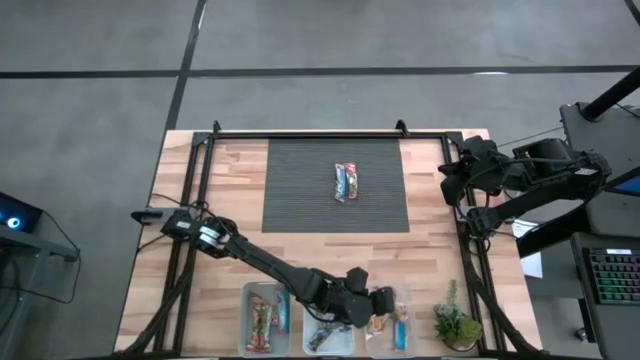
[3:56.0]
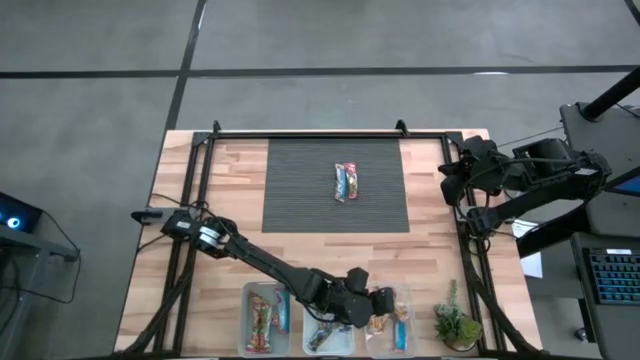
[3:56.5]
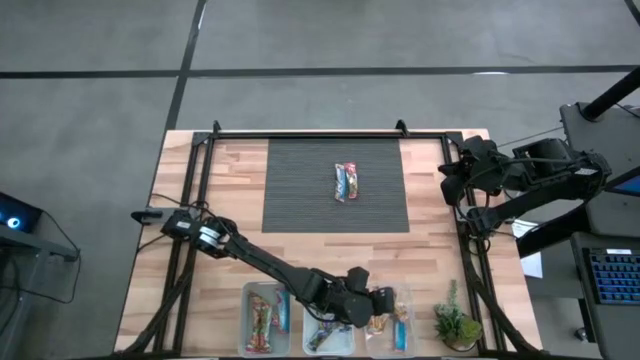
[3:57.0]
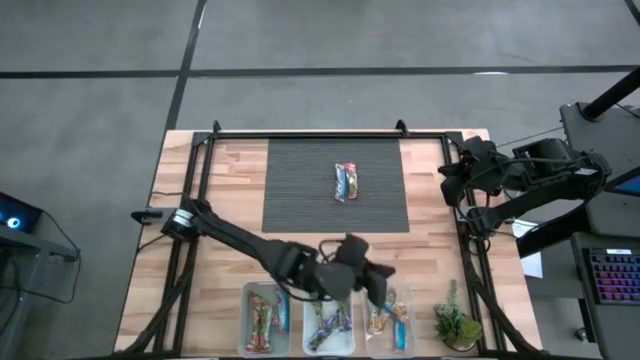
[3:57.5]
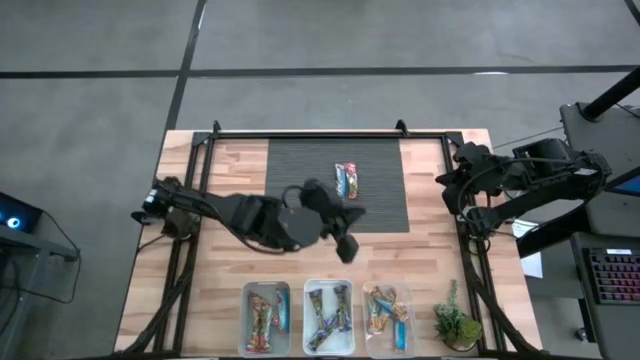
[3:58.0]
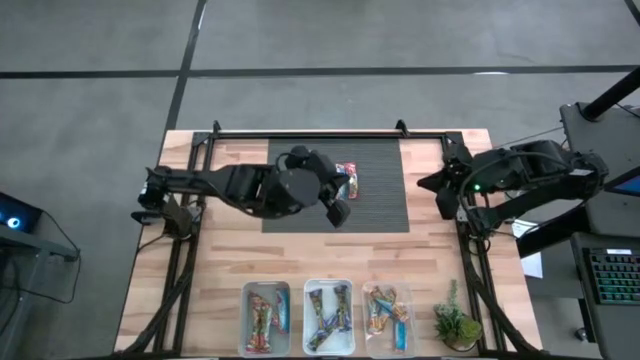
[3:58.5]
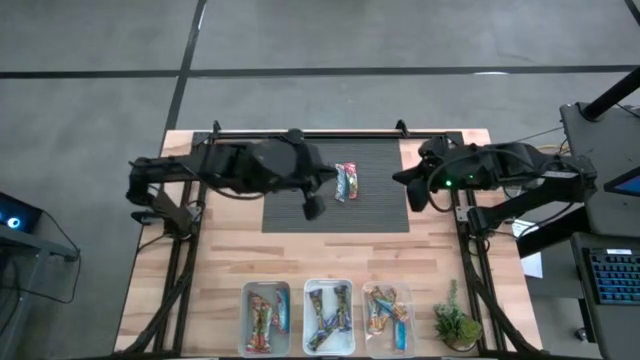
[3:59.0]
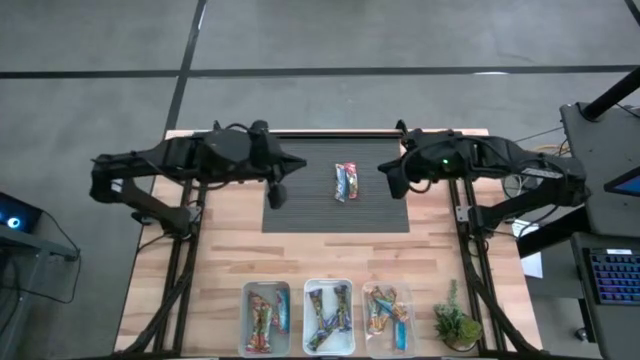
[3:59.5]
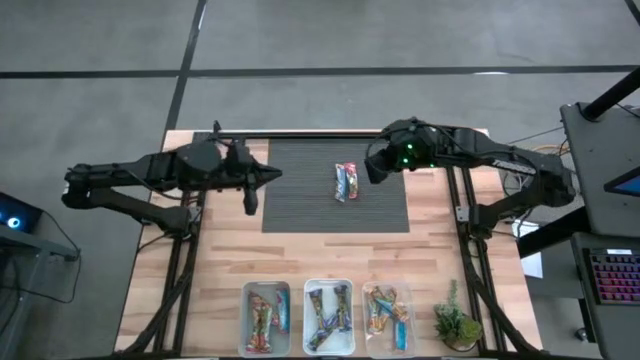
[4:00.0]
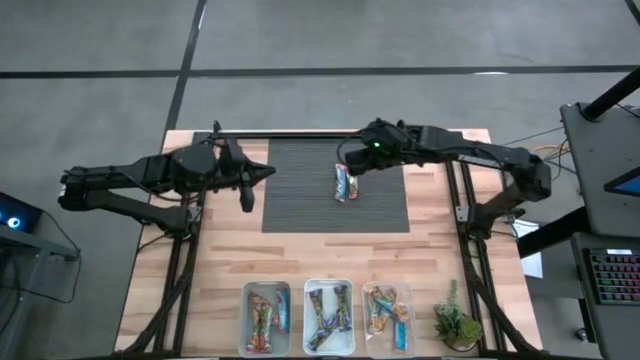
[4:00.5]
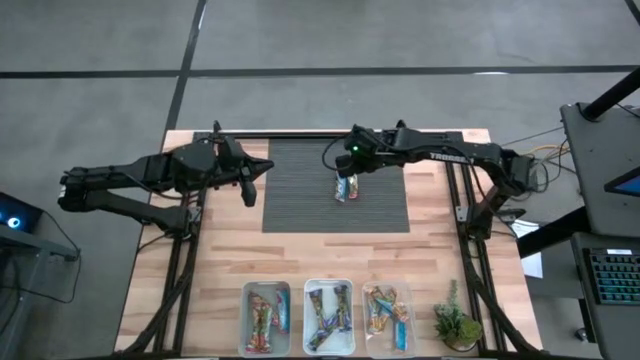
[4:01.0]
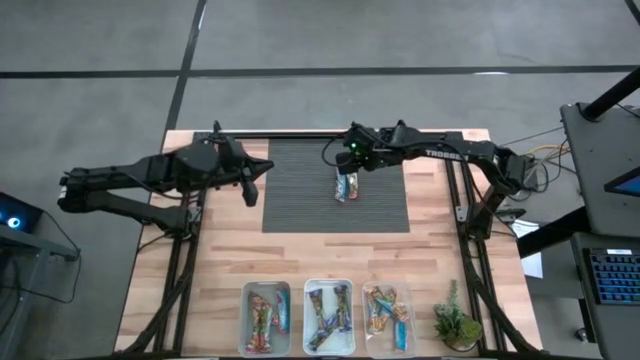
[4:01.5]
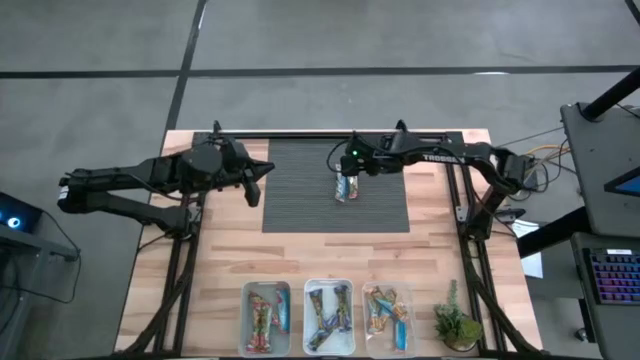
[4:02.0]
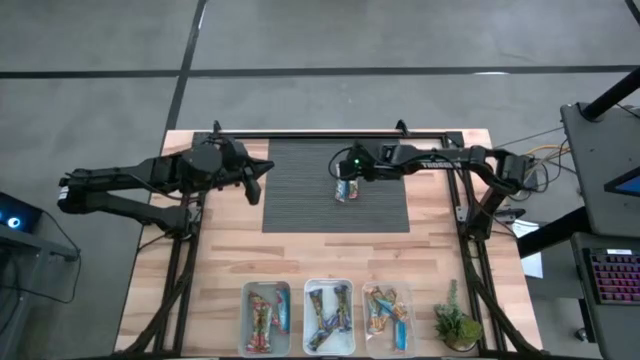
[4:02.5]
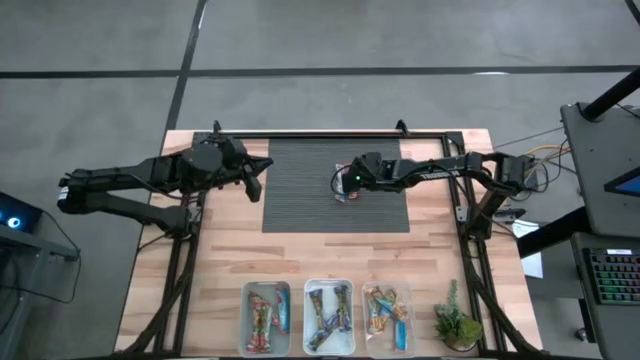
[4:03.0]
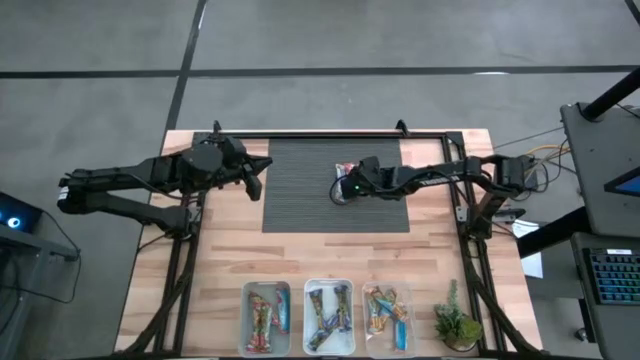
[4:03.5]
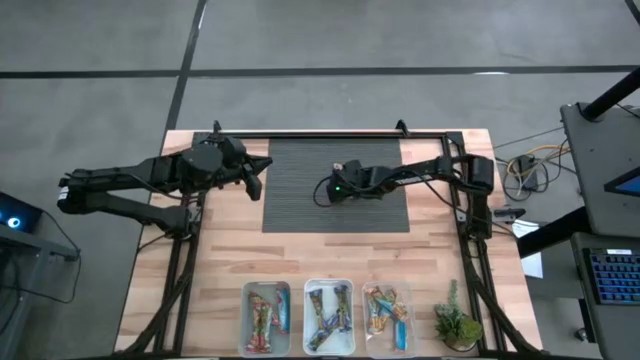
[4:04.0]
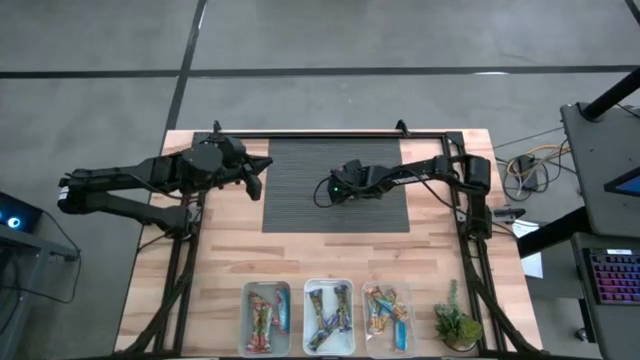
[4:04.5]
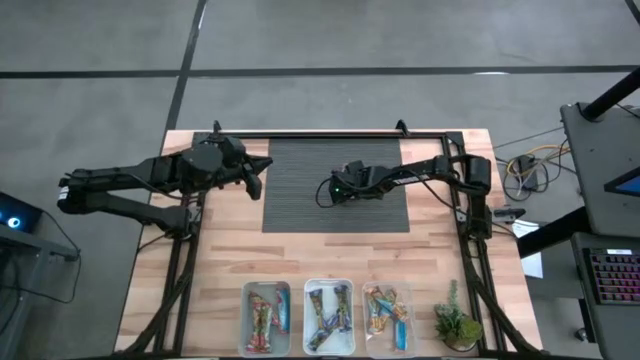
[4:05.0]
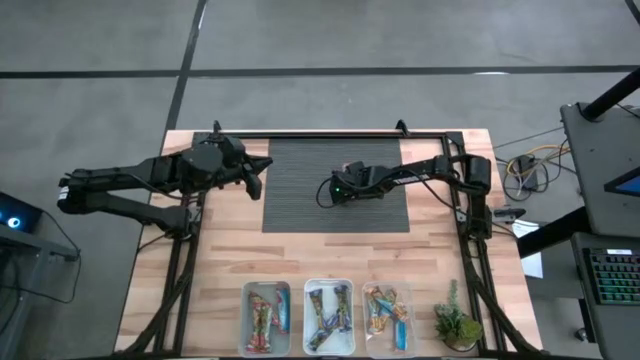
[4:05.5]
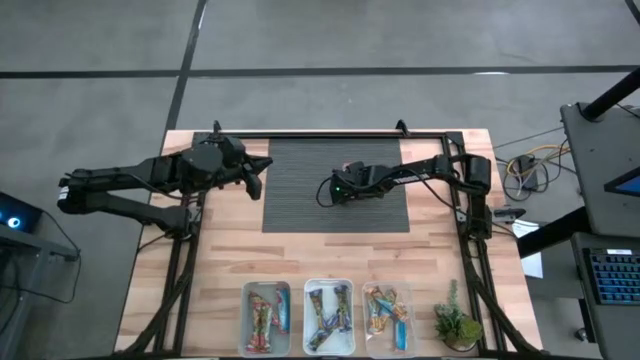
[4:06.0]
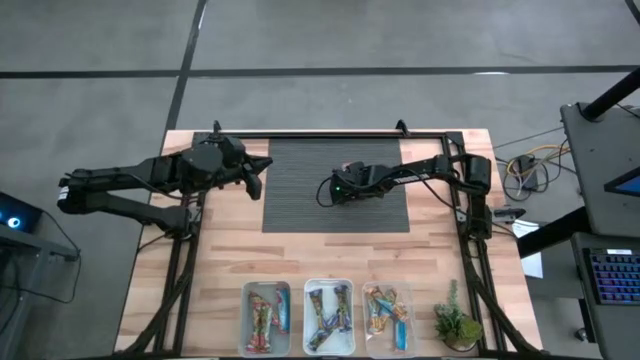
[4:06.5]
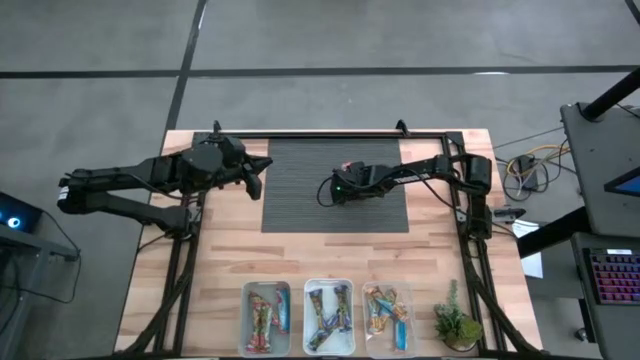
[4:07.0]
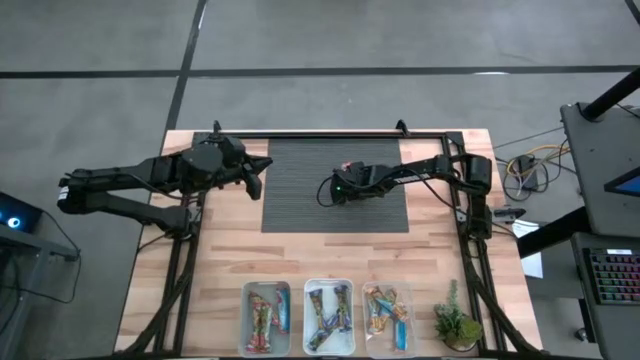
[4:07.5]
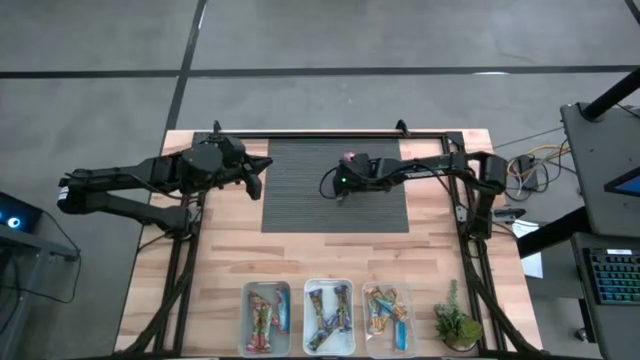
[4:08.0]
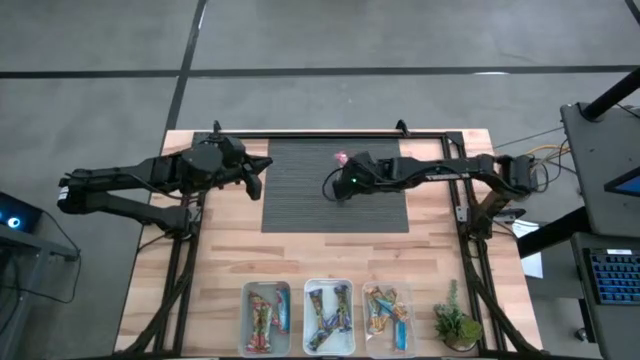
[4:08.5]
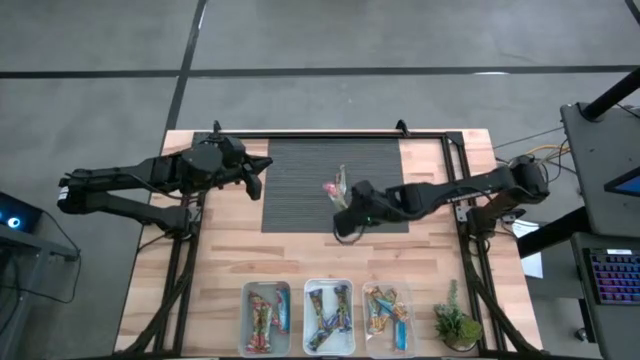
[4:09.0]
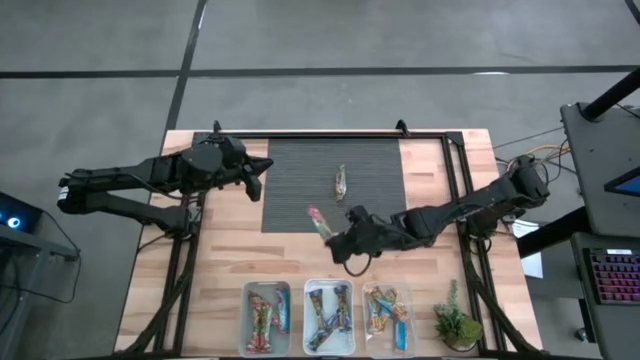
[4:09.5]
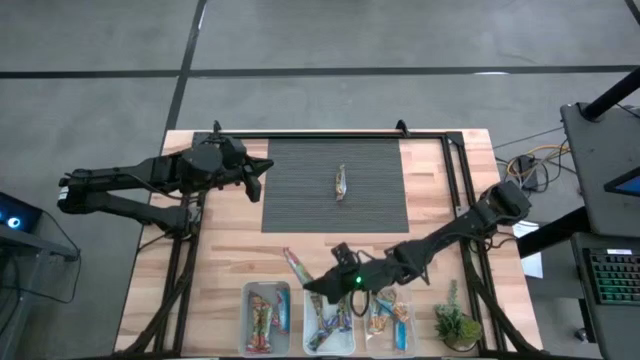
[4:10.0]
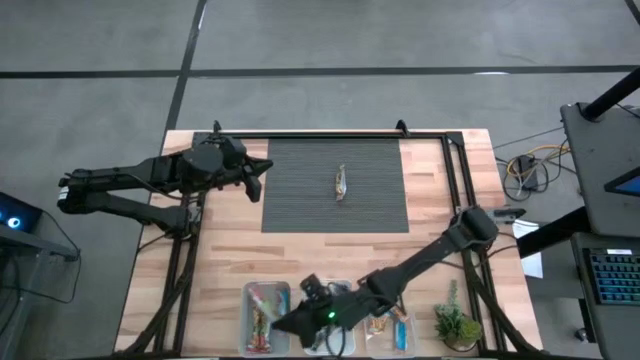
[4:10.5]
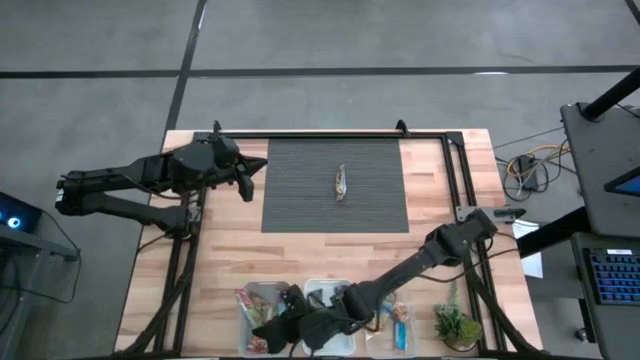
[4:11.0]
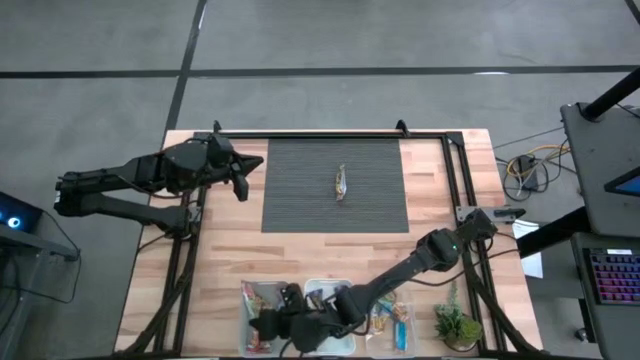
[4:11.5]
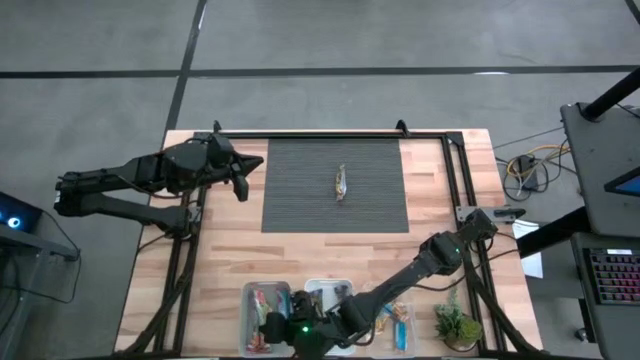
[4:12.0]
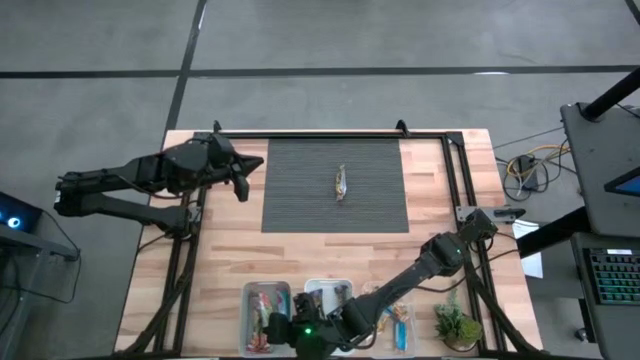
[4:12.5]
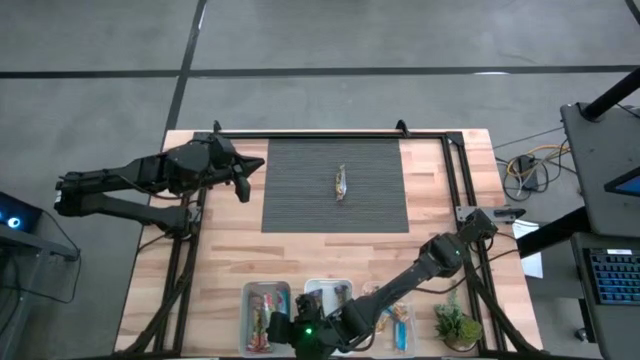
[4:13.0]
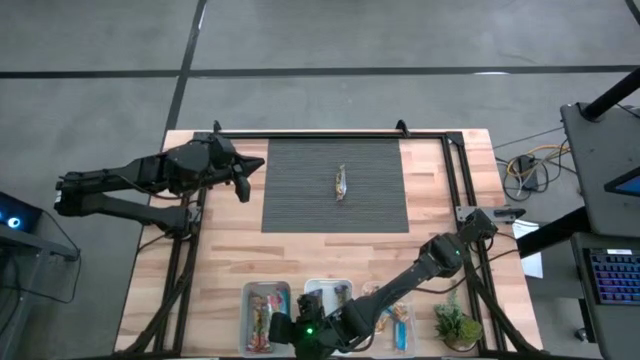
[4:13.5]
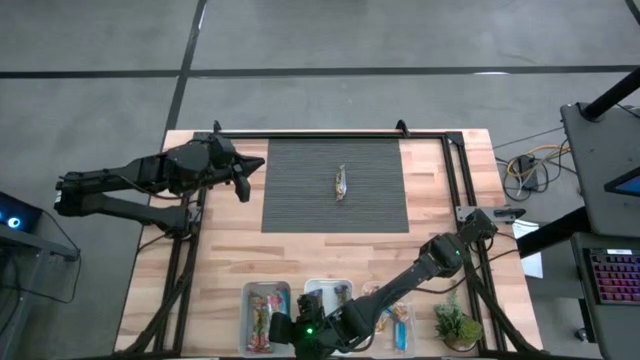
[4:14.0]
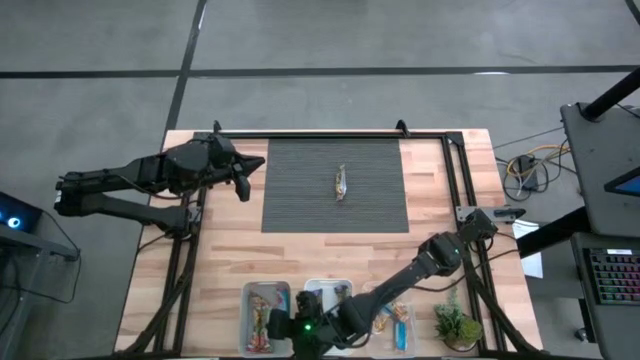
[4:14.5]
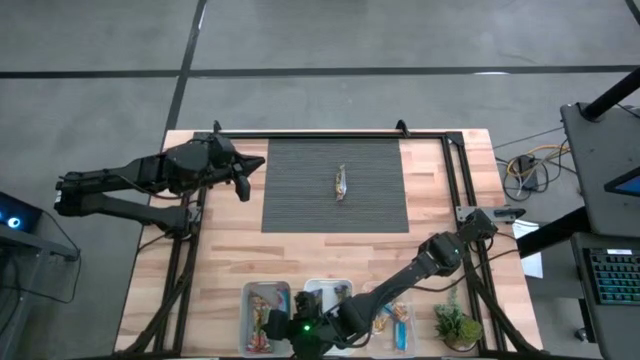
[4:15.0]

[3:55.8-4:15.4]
Task: Pick and place Granola Bars by type
Put the red granola bar into the gray bin

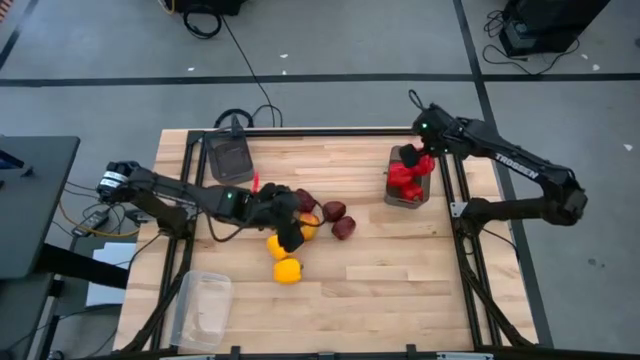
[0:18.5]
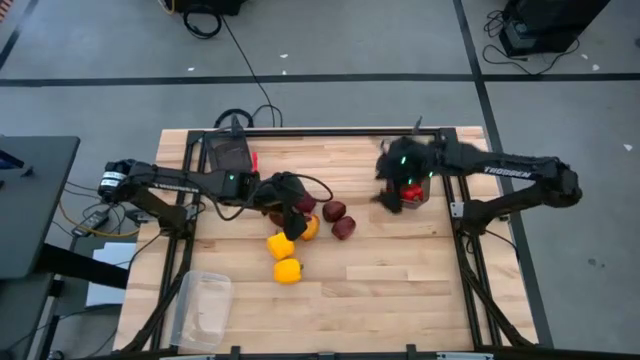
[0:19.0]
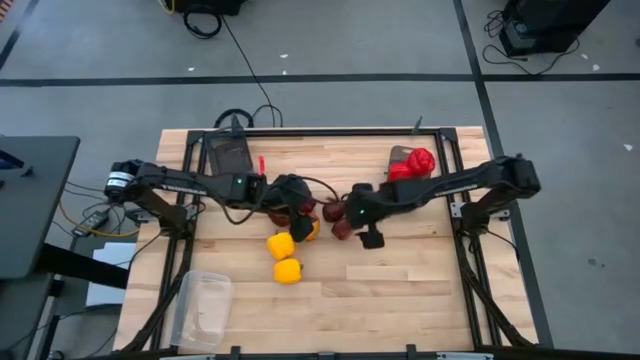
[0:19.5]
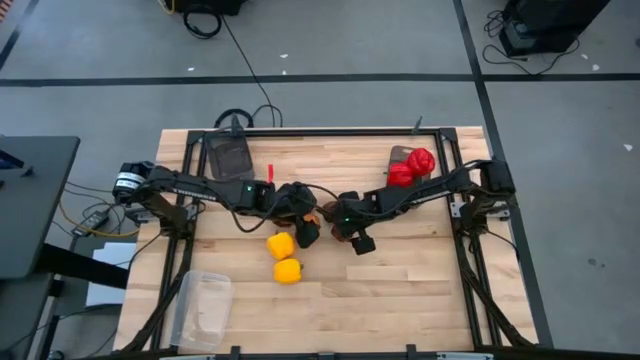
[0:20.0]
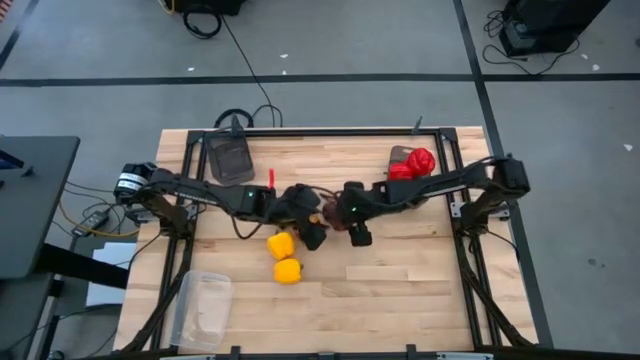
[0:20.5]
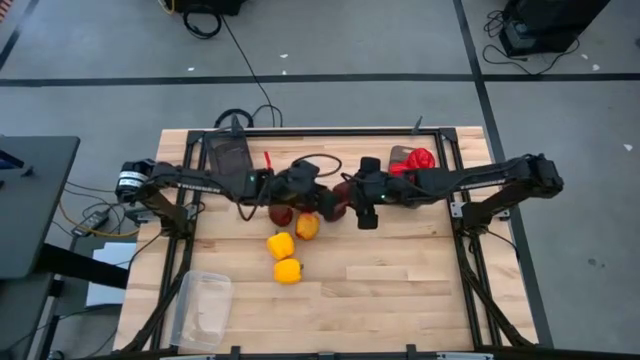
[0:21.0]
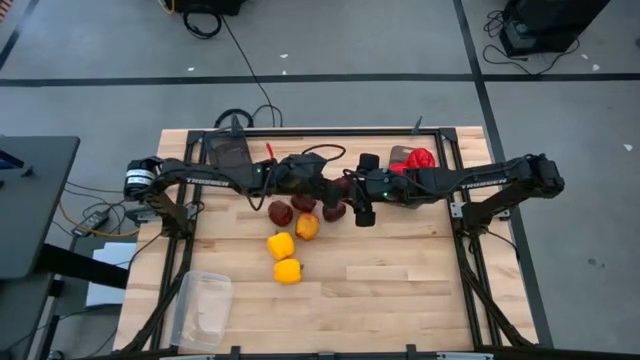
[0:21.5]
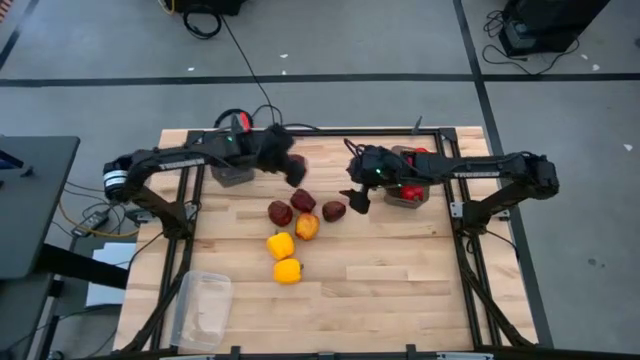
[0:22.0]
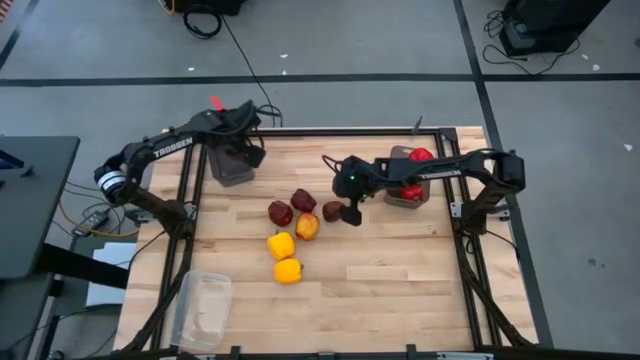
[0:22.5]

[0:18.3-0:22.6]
Task: Sort produce into baskets
Put the red apple into the left black bin
